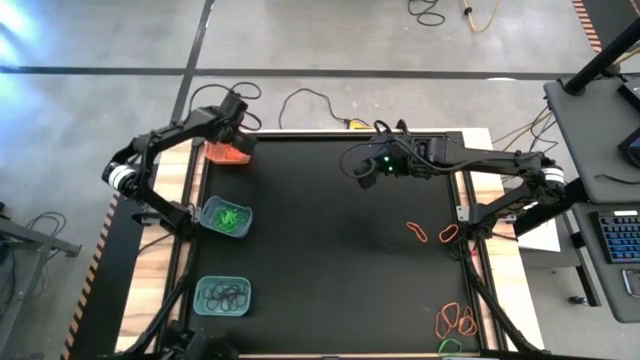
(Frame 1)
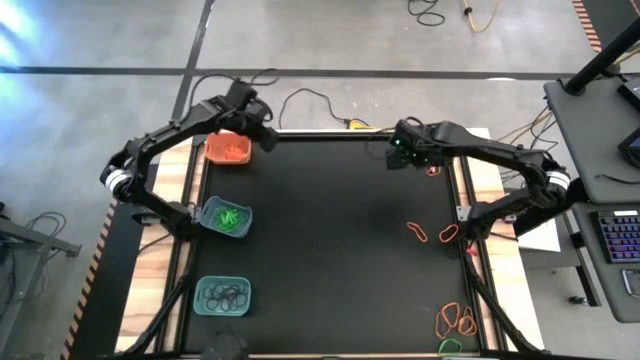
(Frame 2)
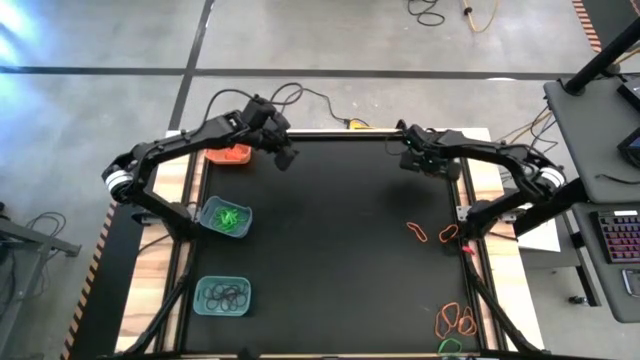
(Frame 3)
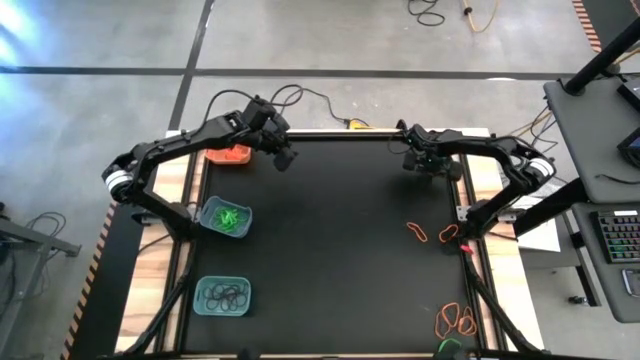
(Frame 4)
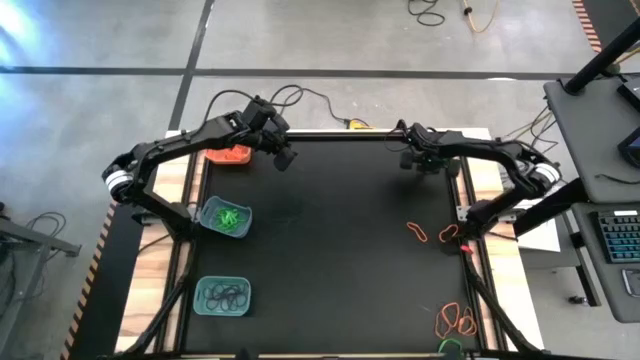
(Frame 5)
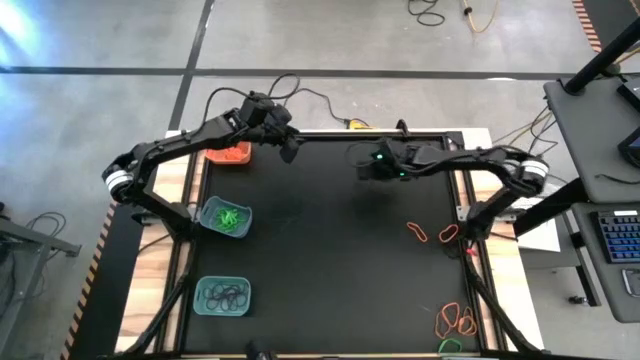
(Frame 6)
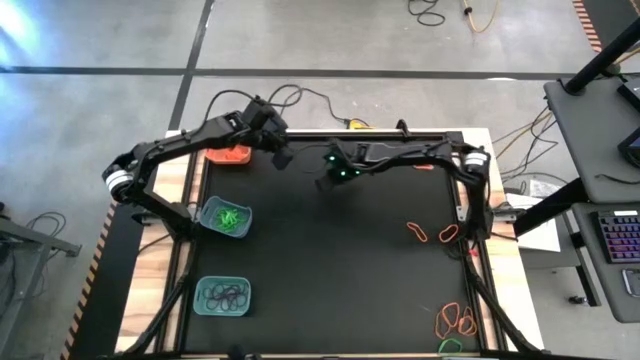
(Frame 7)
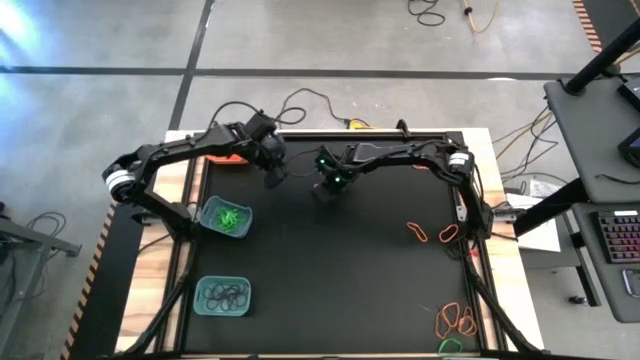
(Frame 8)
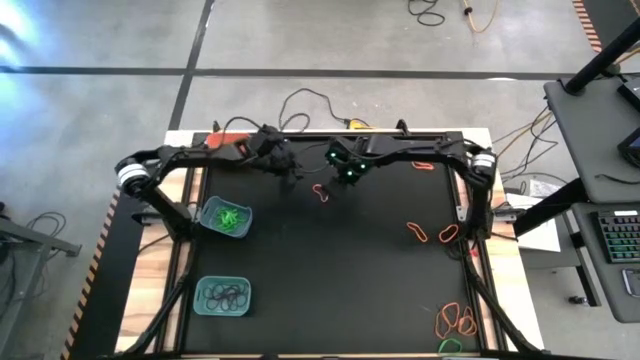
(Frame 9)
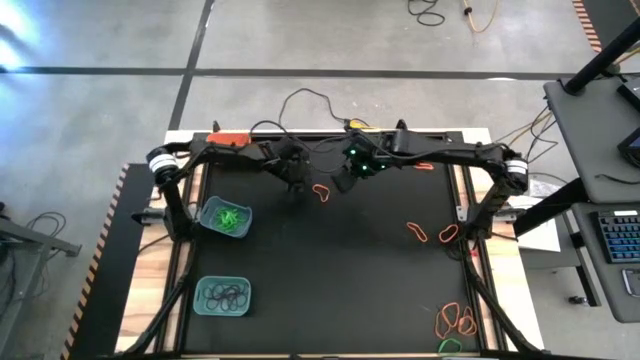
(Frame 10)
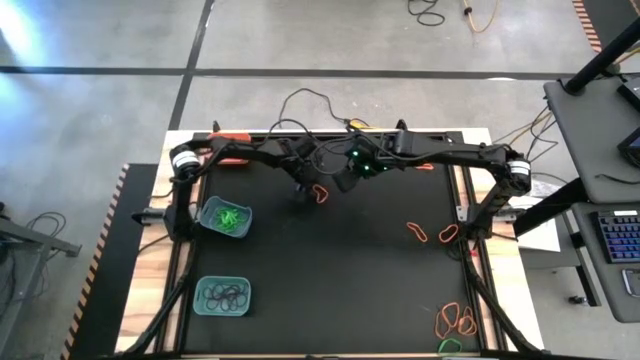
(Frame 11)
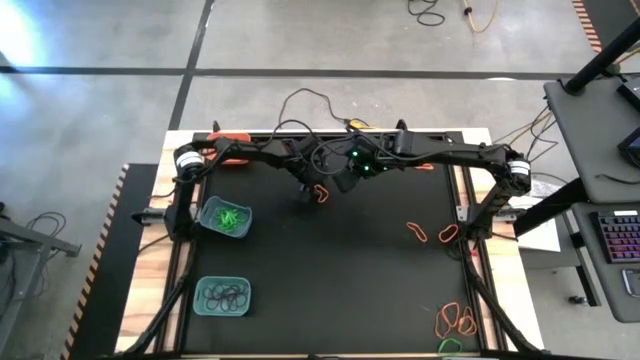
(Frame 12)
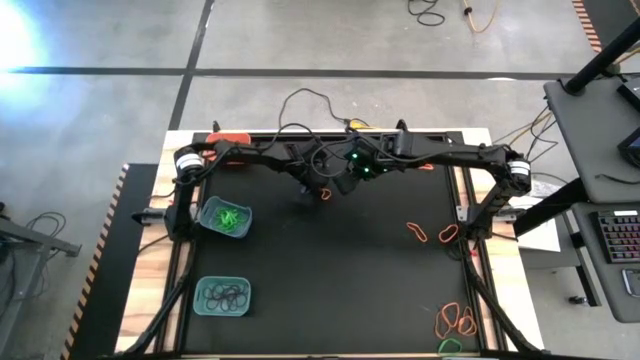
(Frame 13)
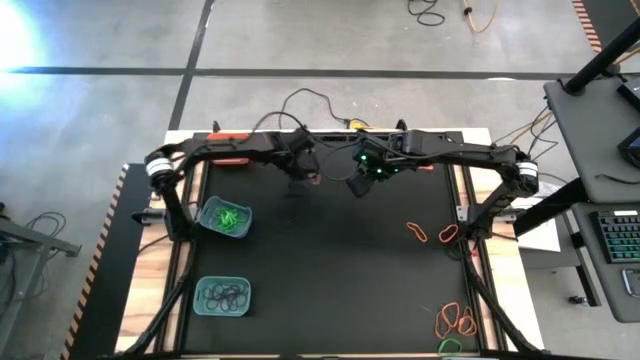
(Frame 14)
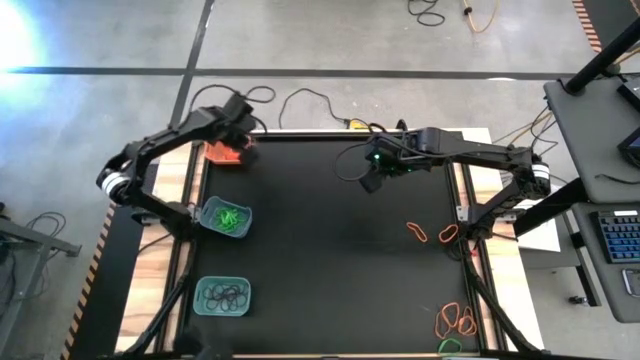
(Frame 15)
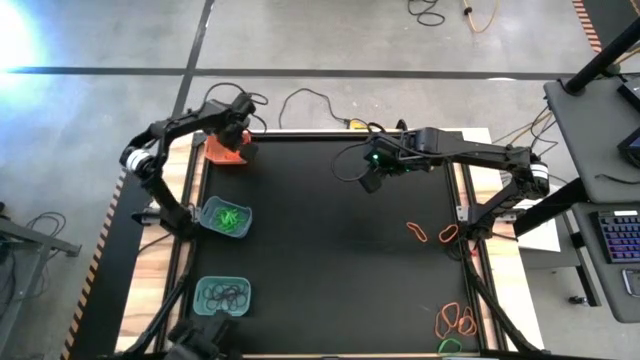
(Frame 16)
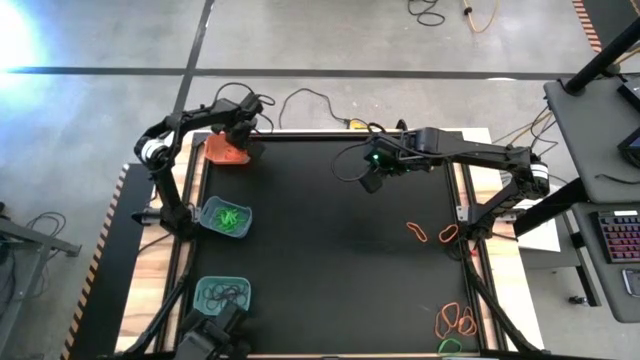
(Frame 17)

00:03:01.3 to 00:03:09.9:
Task: Sort rubber bands into baskets
Put the orange rubber band into the orange bin

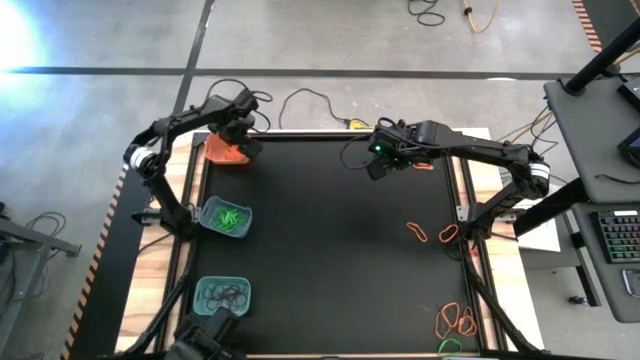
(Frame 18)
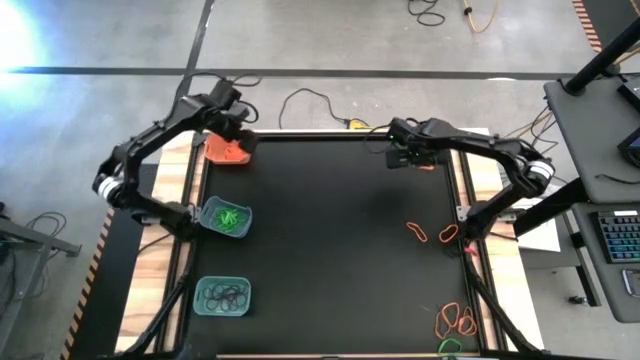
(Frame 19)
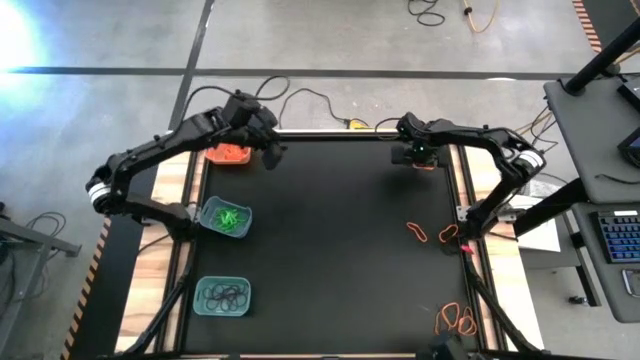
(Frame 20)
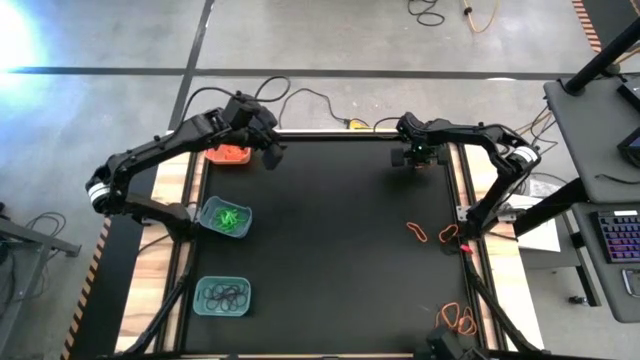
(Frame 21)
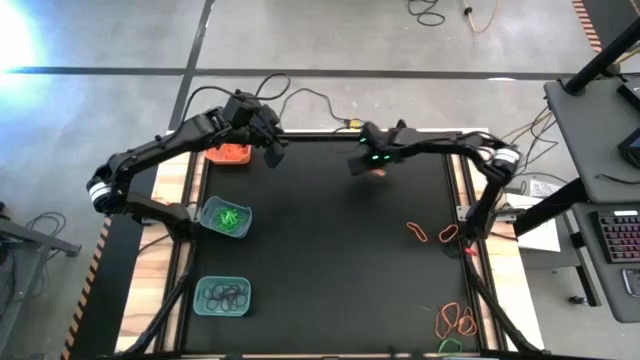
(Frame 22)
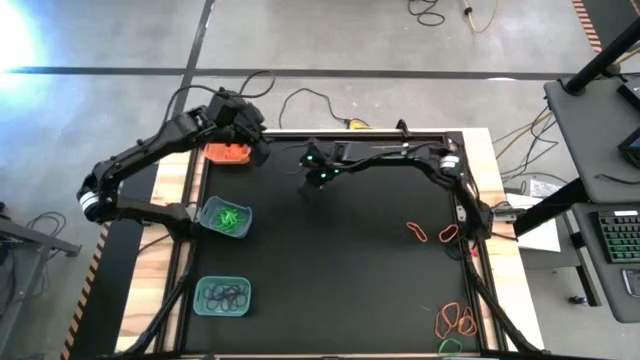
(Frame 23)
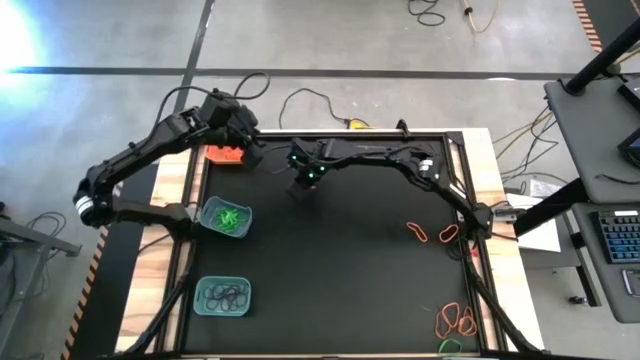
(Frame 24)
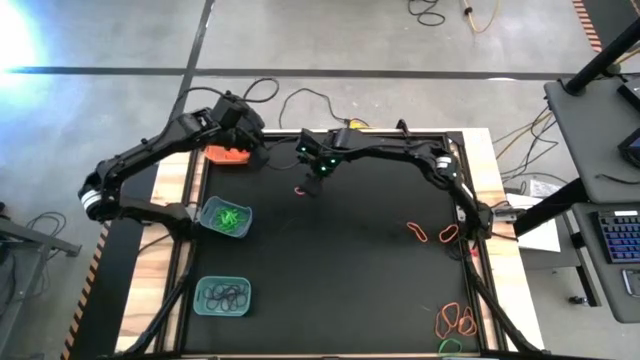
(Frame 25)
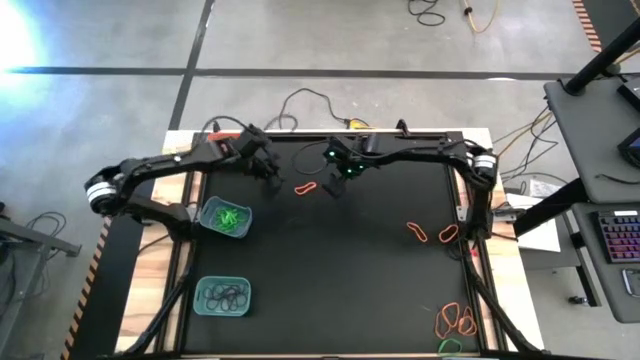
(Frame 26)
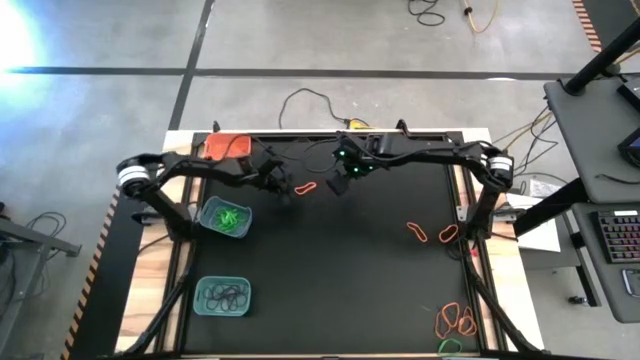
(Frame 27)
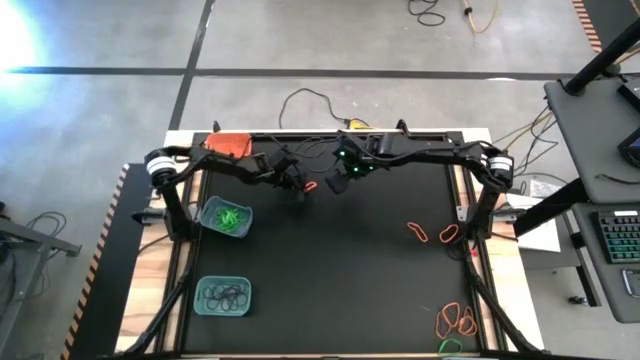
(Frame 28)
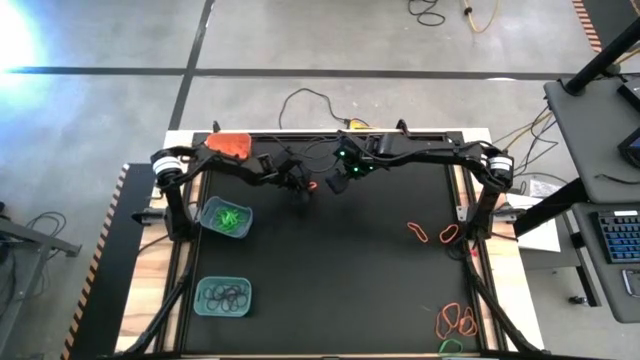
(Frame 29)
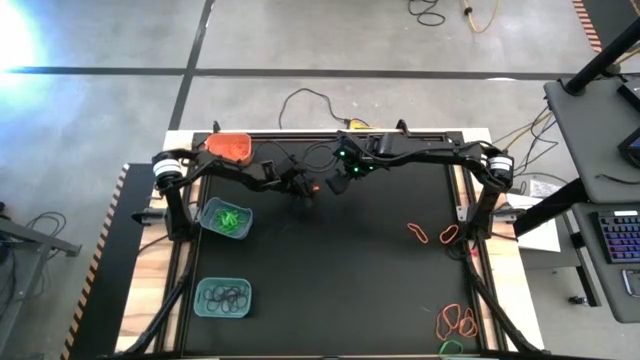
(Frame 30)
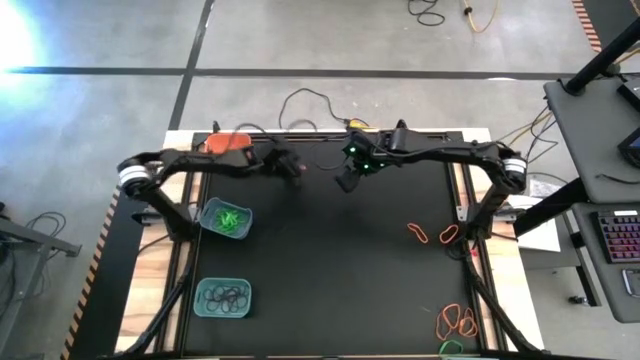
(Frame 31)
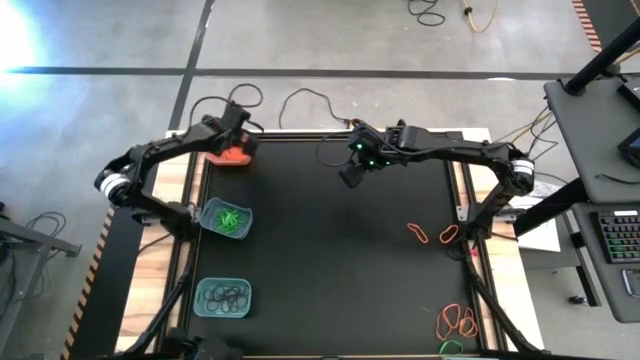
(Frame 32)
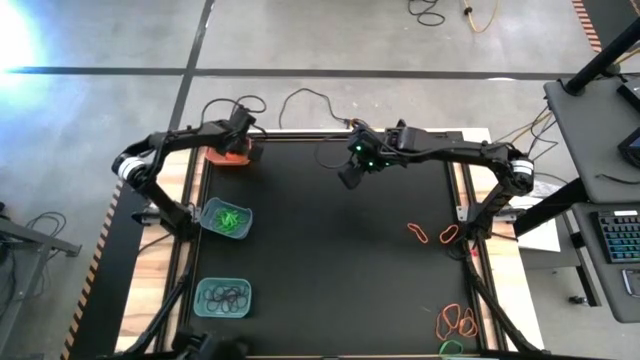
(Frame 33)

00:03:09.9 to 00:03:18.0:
Put the orange rubber band into the orange bin

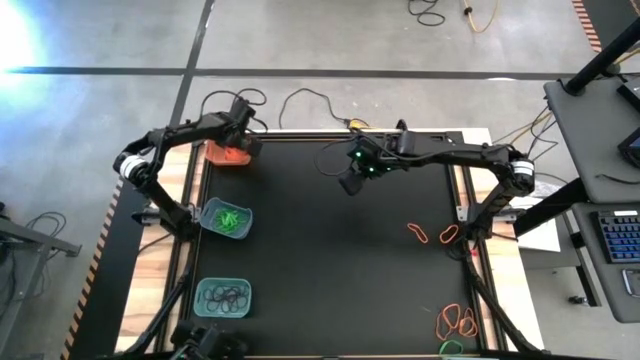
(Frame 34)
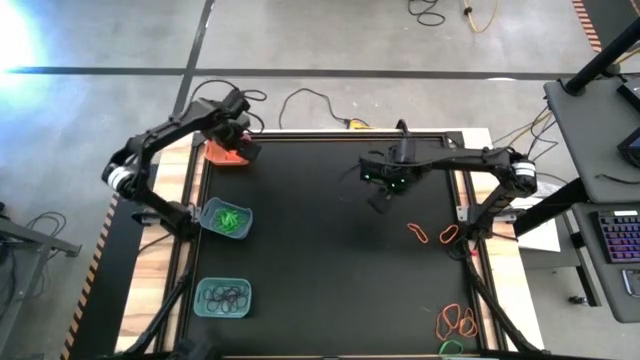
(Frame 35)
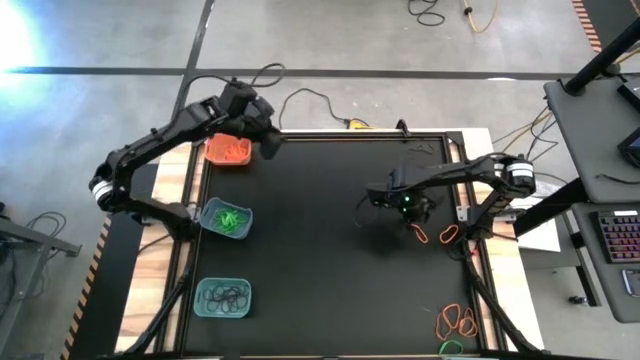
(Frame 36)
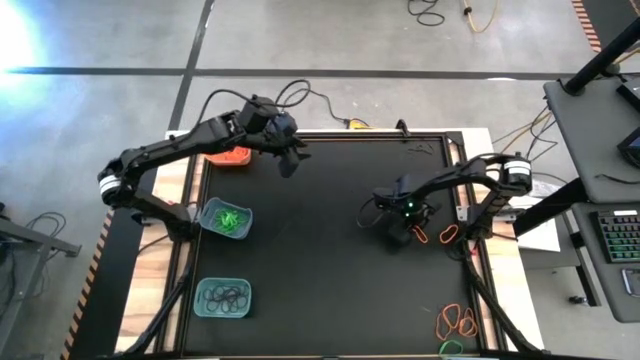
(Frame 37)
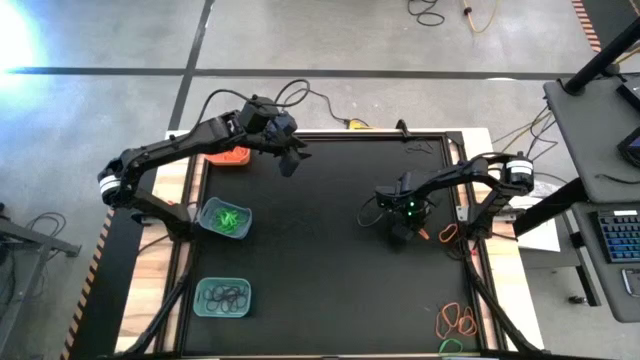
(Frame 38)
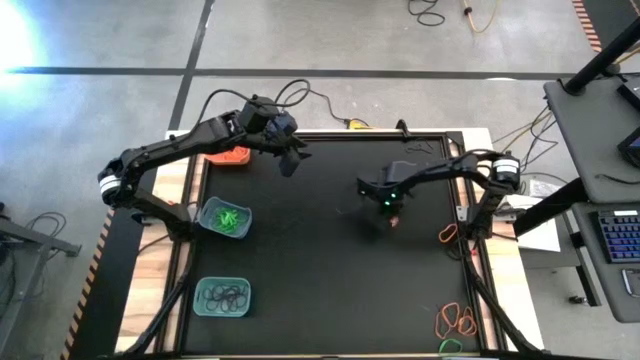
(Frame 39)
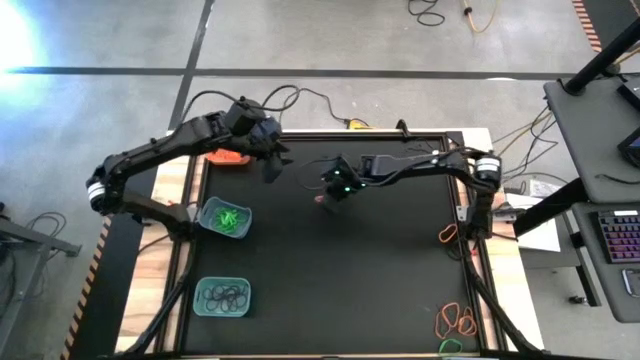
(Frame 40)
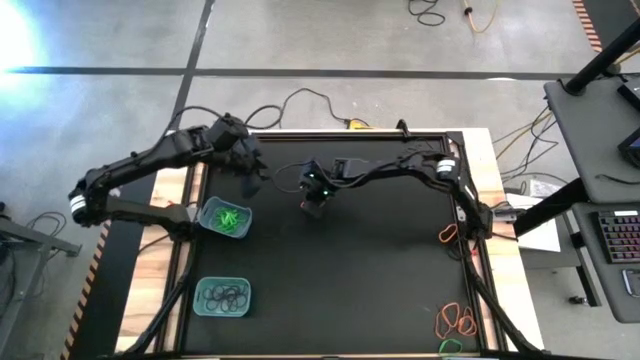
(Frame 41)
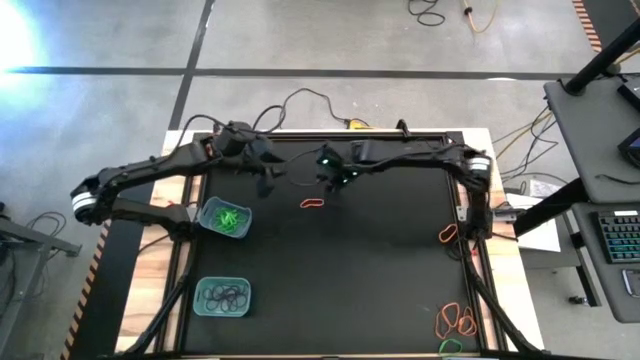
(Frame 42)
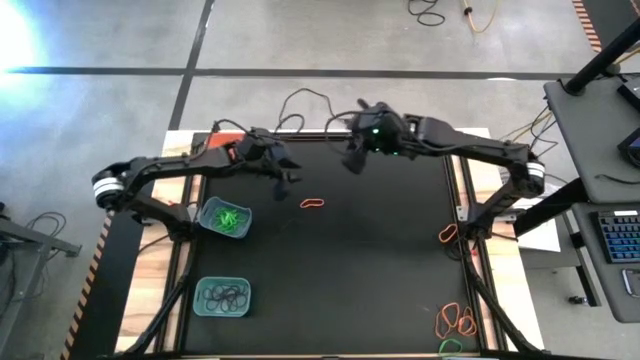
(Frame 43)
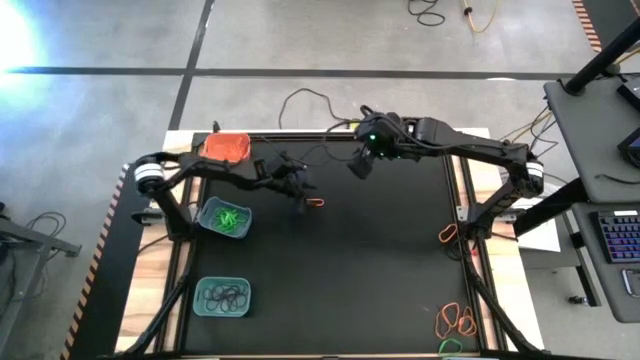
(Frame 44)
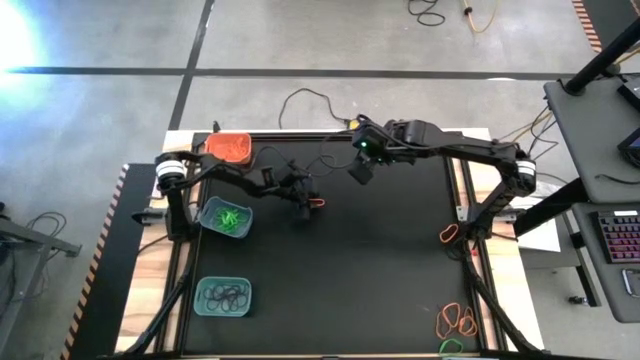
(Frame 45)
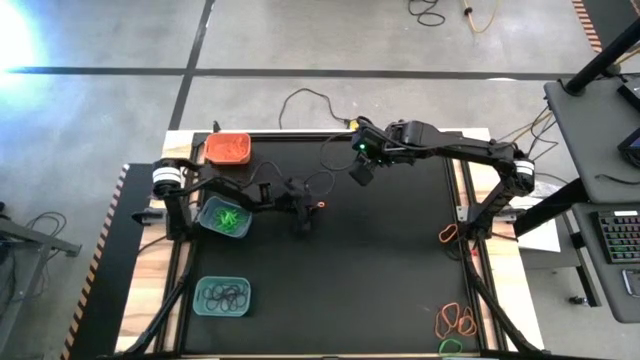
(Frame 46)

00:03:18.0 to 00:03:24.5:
Put the orange rubber band into the orange bin
